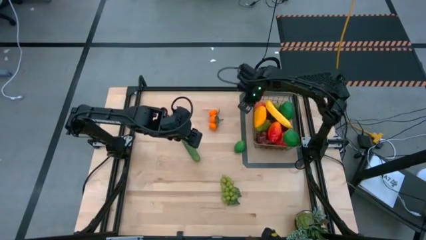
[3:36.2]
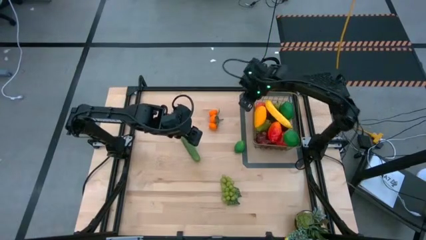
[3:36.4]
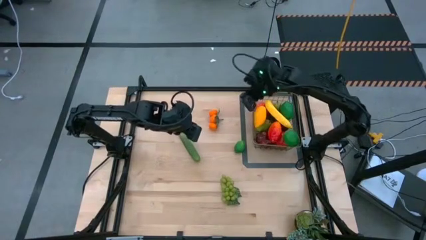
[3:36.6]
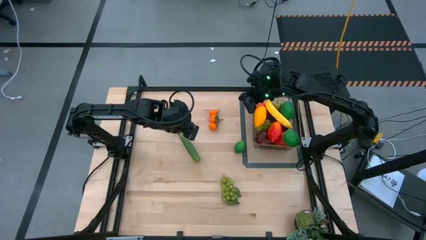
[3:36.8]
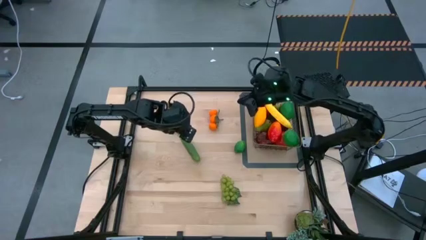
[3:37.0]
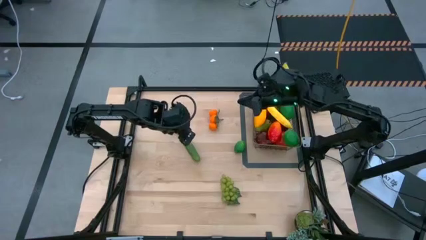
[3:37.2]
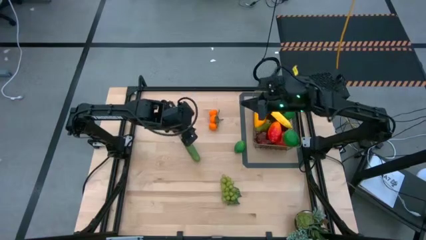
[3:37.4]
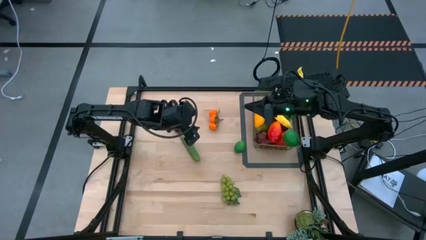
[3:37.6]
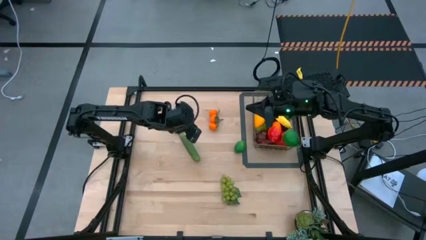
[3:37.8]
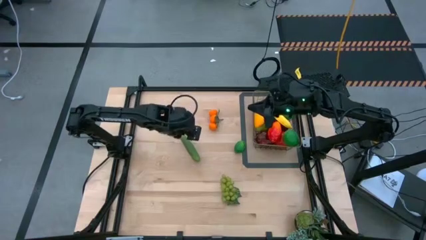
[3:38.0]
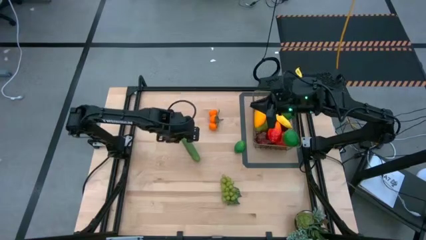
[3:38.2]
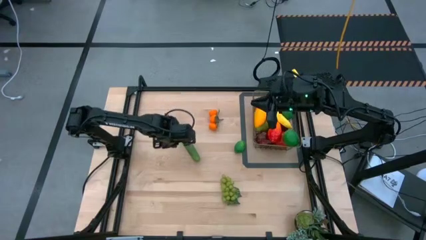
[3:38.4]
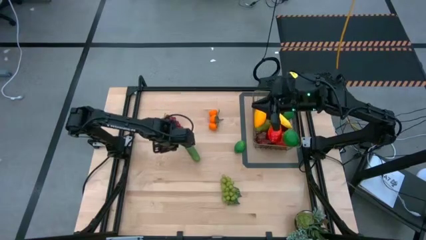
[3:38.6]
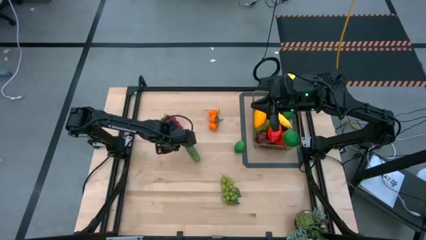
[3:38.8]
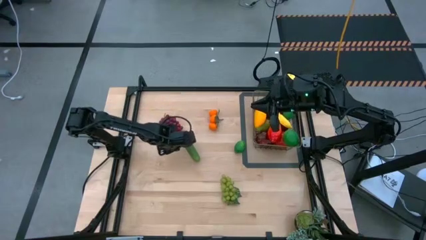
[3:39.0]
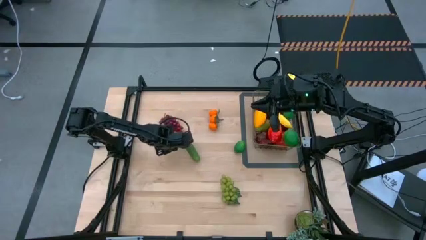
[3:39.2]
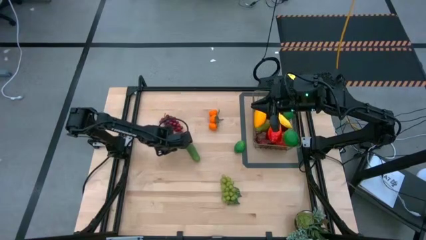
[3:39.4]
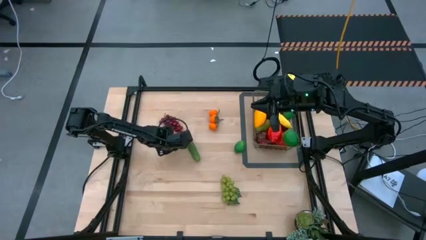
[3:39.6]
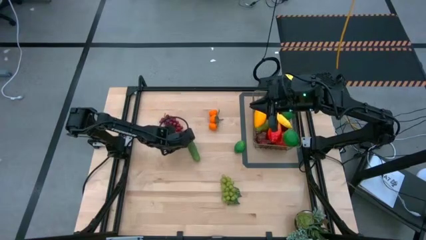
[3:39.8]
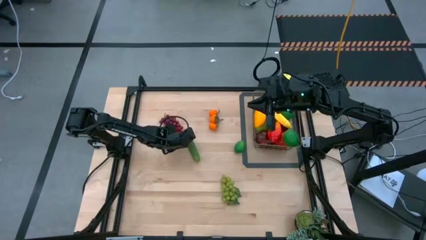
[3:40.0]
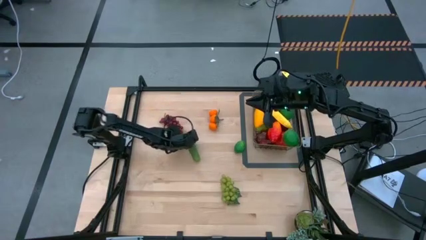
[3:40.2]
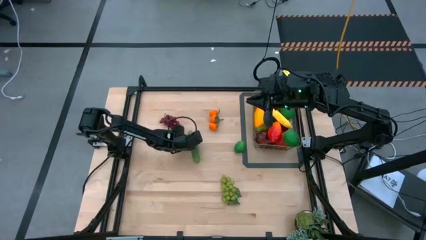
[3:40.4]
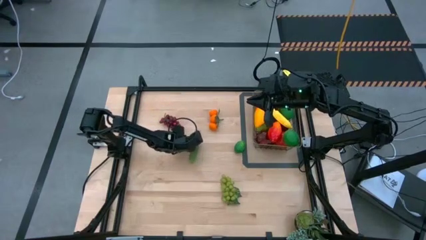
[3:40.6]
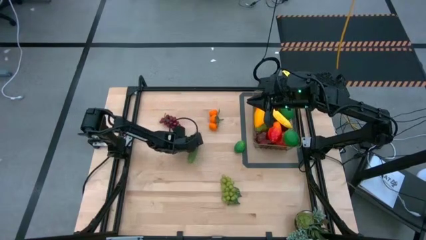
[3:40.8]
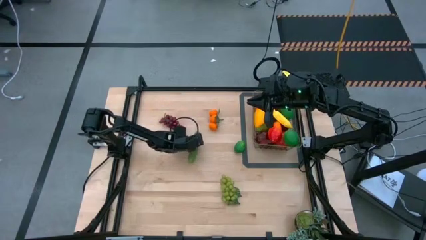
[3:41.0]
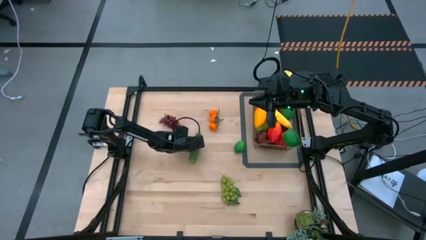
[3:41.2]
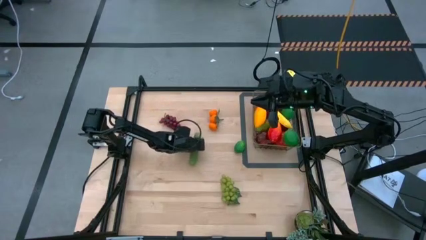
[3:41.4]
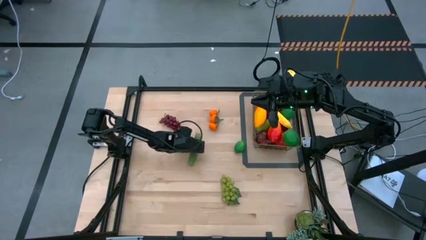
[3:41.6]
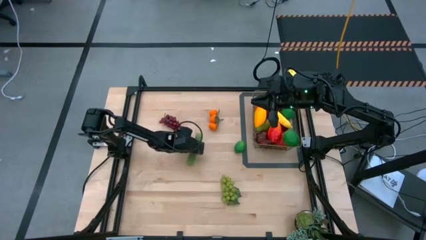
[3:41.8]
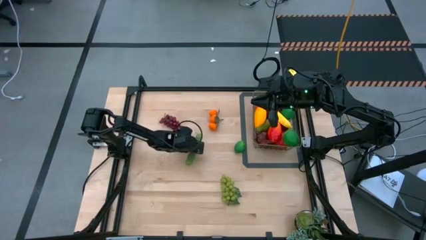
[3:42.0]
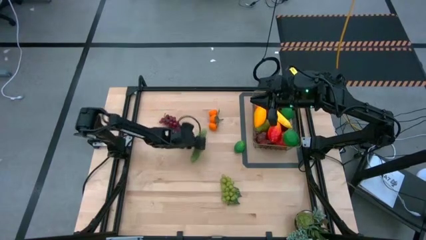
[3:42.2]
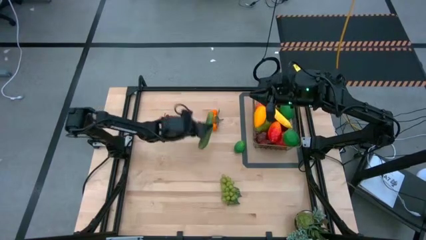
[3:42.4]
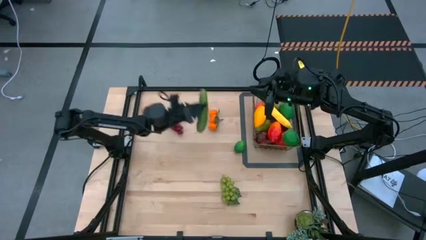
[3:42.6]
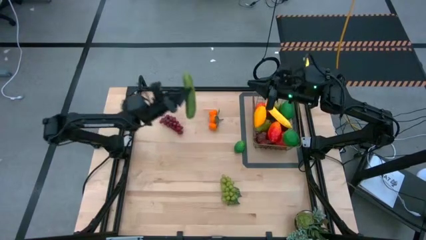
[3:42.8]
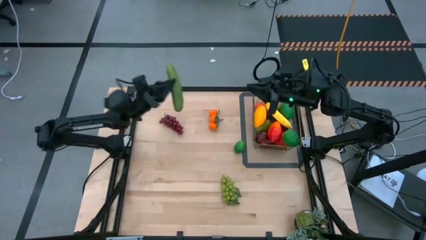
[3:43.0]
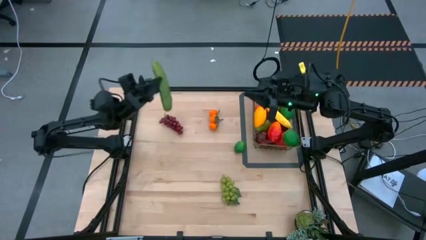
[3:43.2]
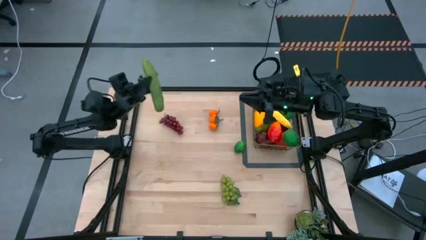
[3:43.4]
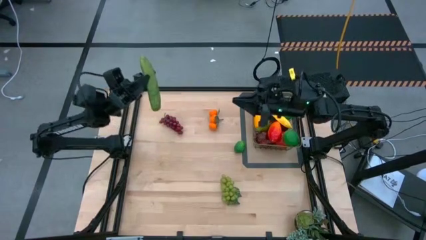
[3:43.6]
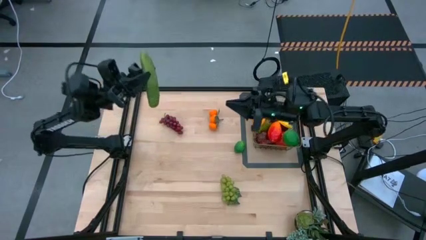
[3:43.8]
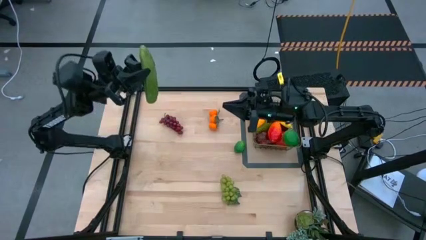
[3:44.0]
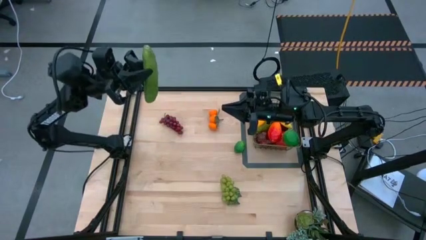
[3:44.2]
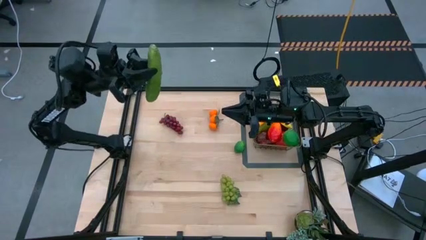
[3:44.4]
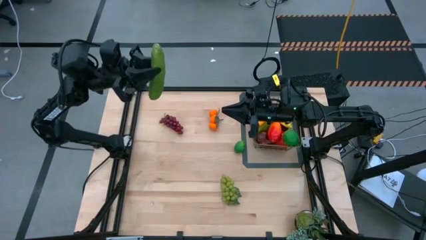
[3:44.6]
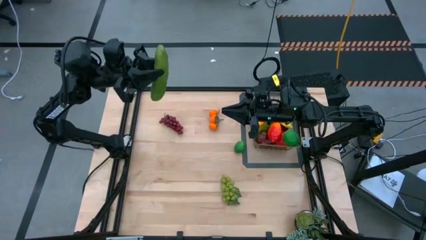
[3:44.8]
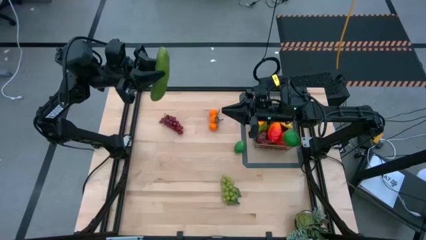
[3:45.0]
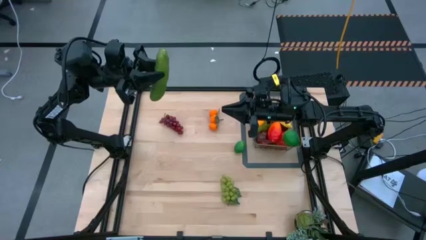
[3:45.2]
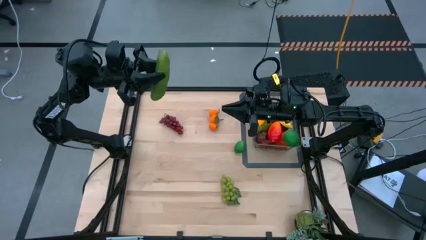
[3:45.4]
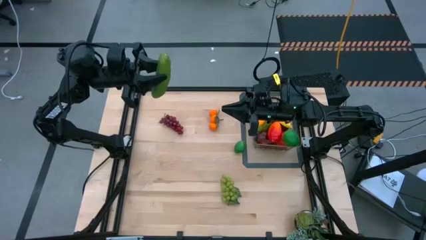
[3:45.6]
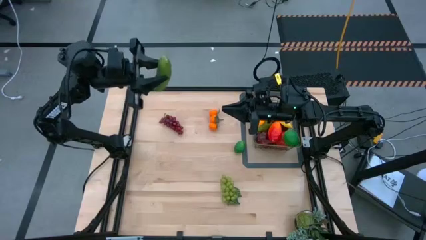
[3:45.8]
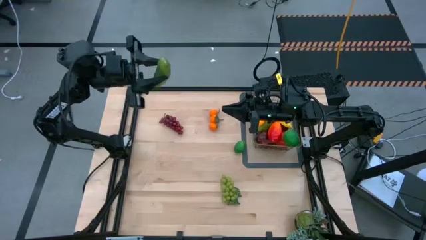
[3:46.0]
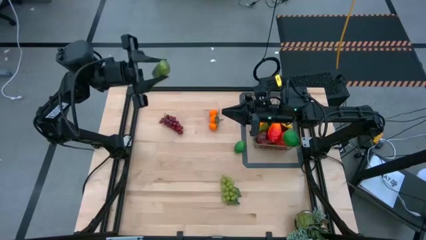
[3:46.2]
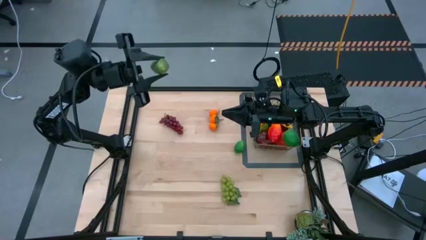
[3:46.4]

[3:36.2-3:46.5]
Task: Build produce basket
Put the green cucumber into the wire basket

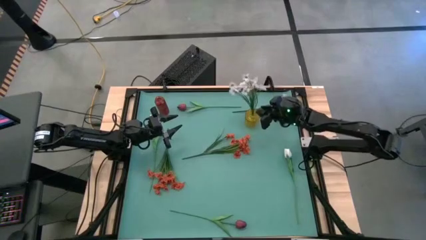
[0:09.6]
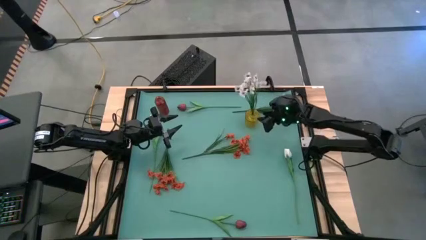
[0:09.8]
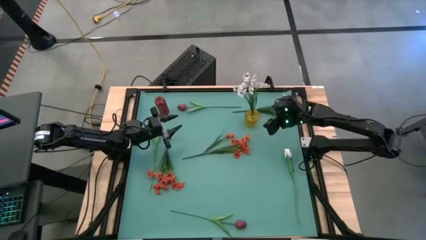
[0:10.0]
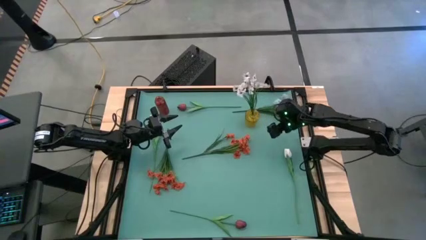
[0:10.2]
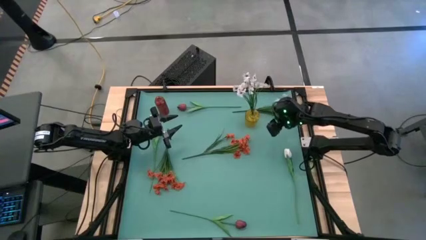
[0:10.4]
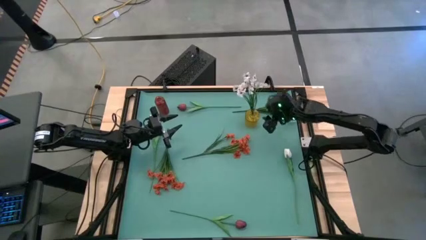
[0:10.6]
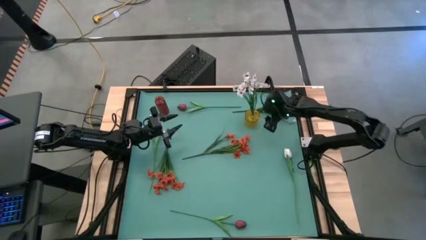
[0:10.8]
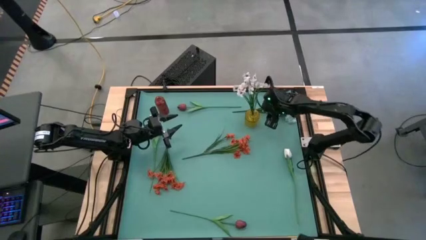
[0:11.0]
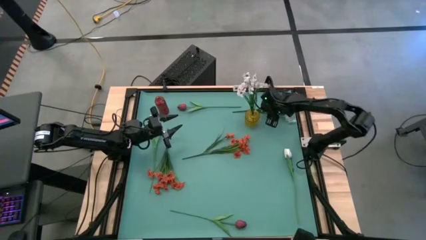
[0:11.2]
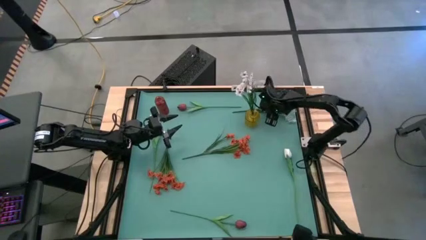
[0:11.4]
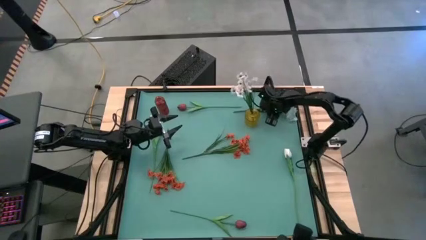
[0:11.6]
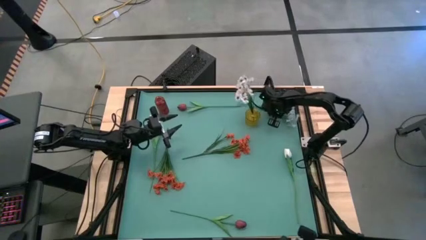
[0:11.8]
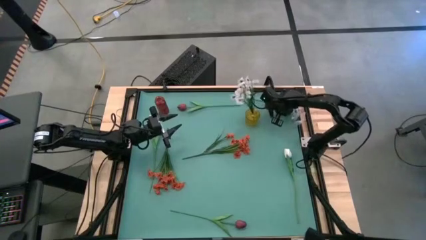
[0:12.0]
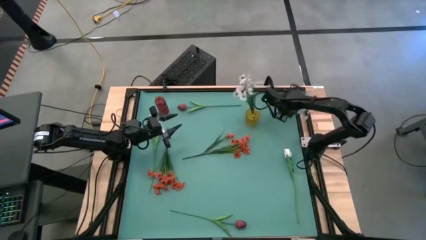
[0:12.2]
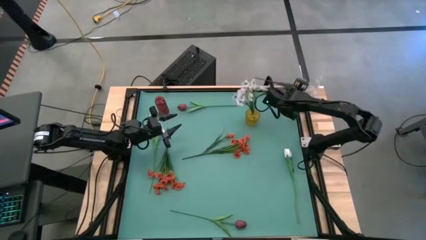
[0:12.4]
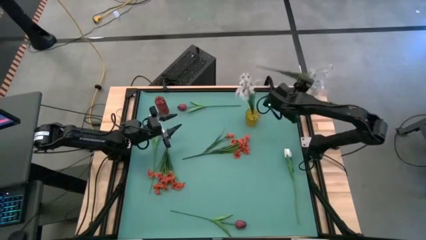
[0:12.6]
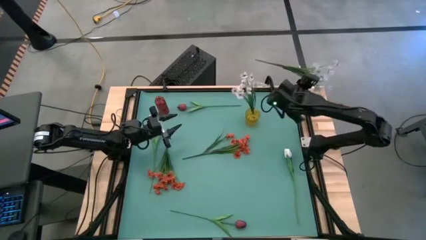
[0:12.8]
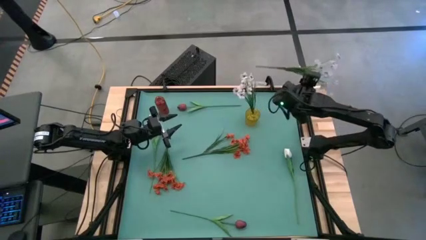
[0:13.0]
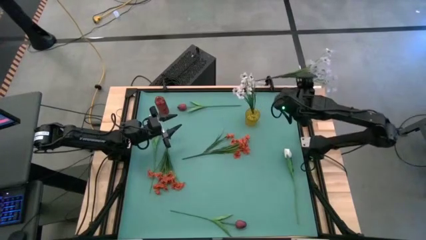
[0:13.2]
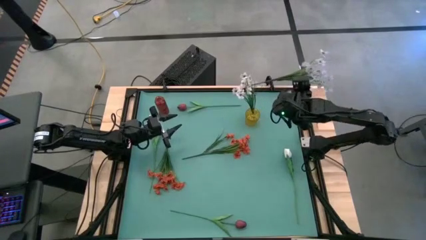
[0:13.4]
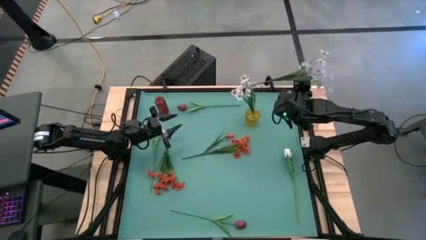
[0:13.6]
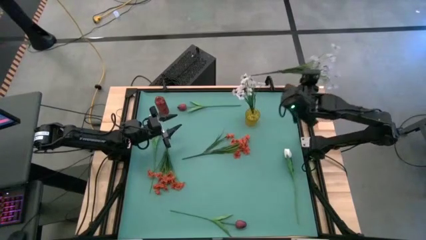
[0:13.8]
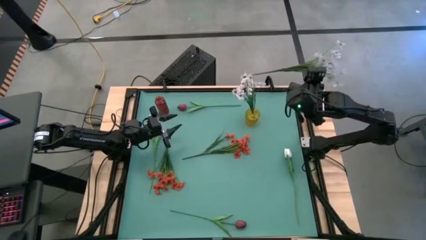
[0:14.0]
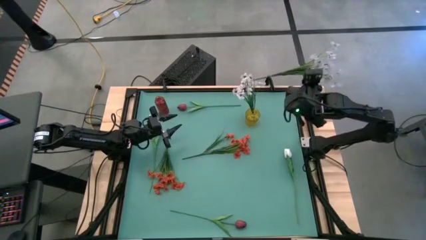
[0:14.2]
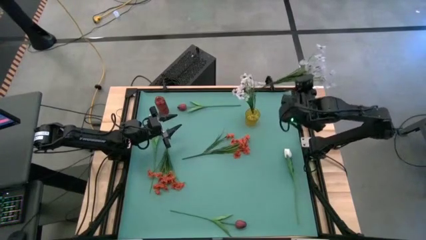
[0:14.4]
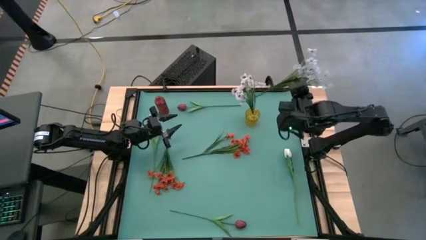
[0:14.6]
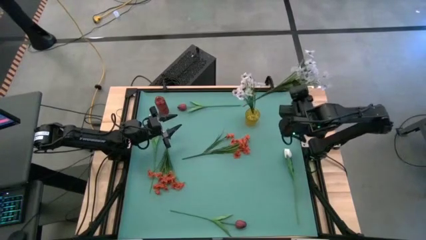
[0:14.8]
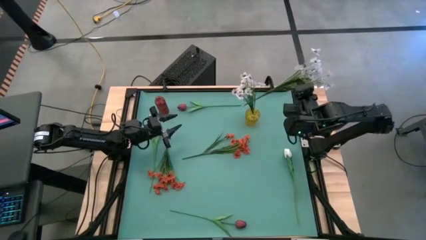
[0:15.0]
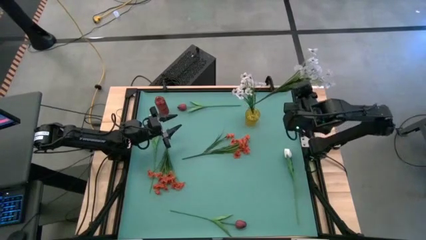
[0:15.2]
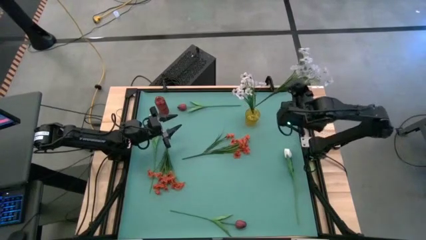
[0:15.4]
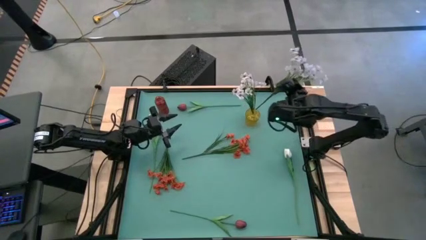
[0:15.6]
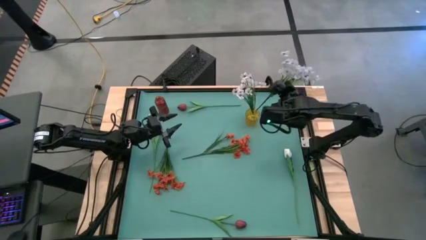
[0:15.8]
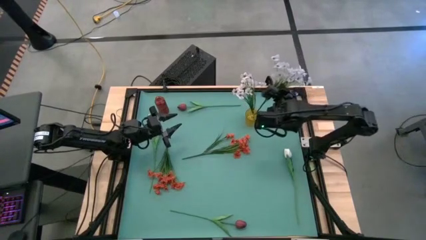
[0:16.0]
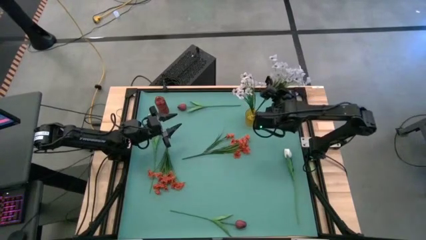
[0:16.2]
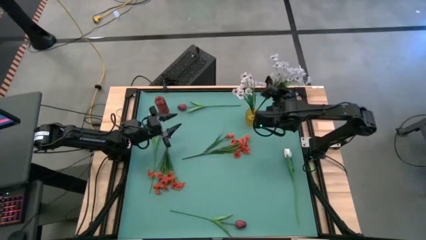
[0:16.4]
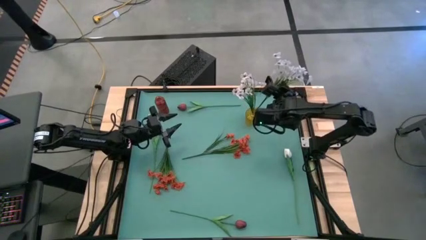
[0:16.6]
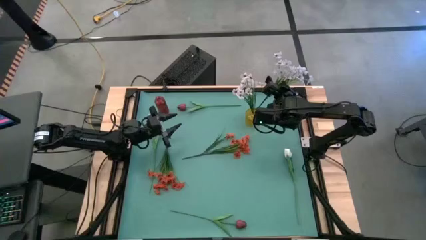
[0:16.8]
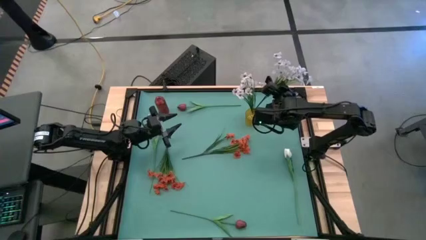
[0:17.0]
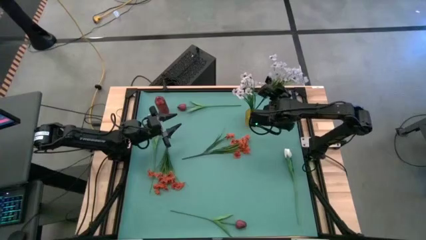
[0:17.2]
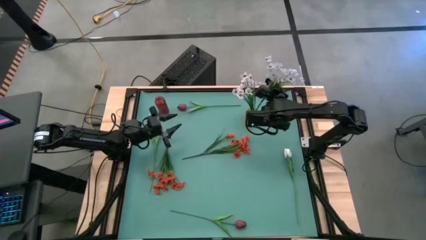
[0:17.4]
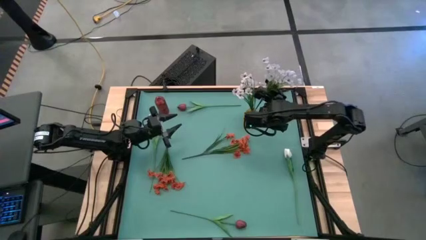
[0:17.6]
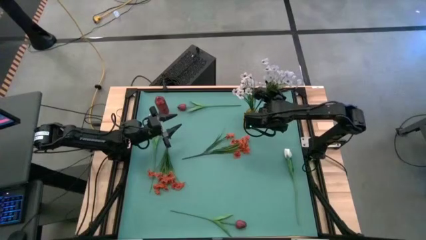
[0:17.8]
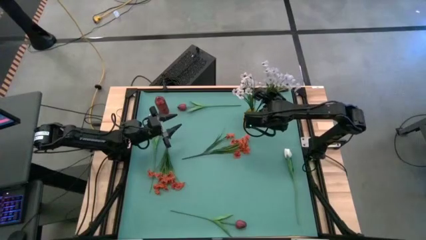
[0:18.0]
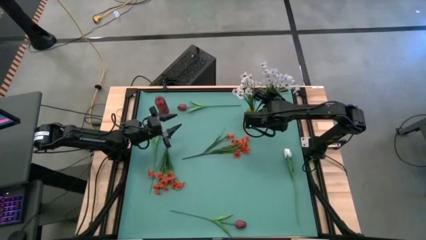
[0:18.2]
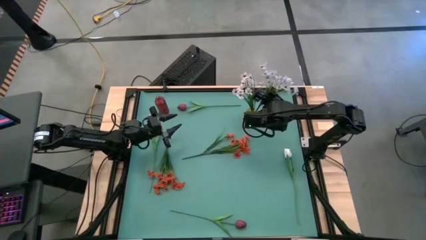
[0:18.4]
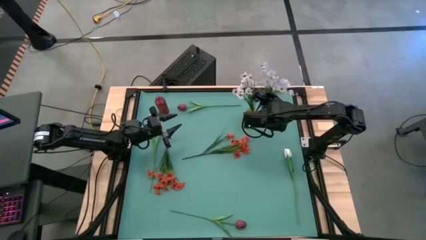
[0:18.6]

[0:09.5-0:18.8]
Task: Sort flowers into vase by color
Put the top white flower into the yellow flower vase
